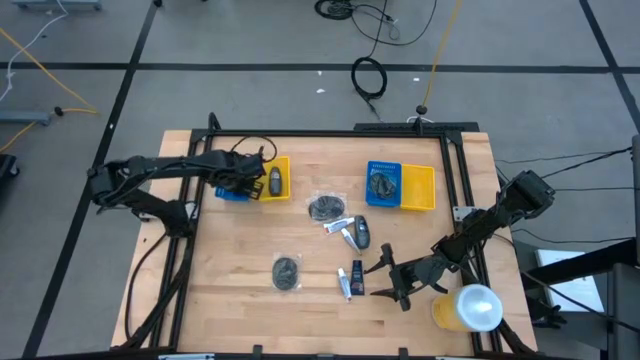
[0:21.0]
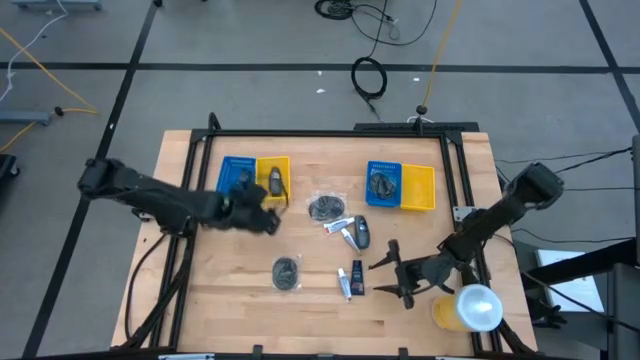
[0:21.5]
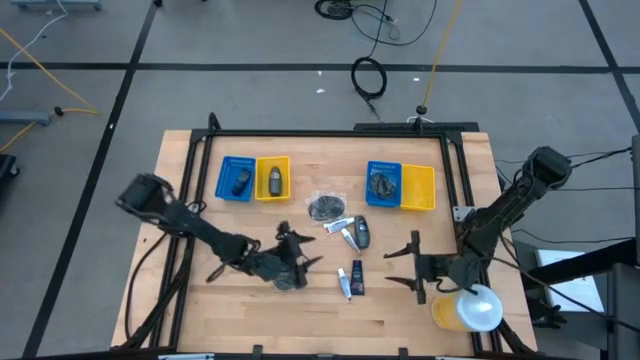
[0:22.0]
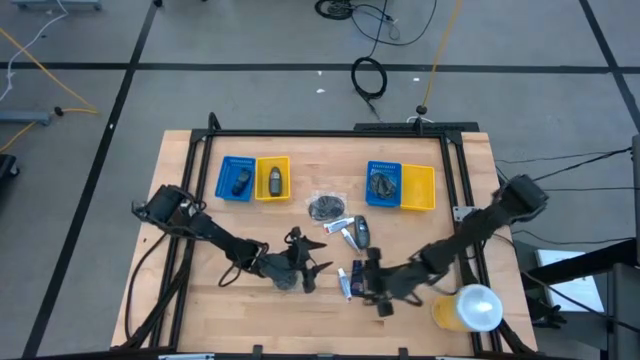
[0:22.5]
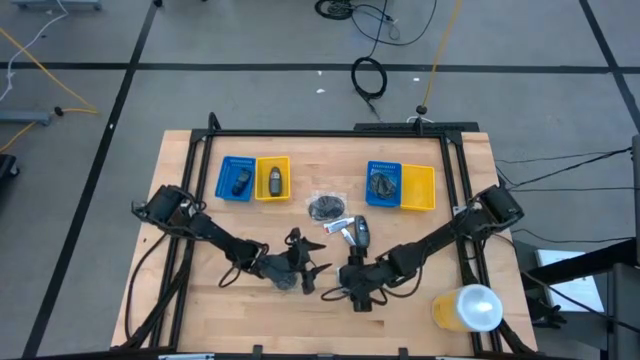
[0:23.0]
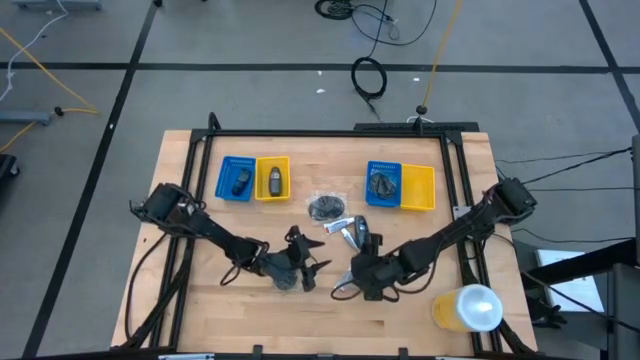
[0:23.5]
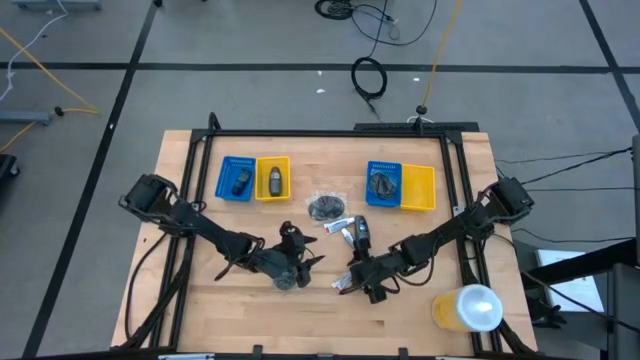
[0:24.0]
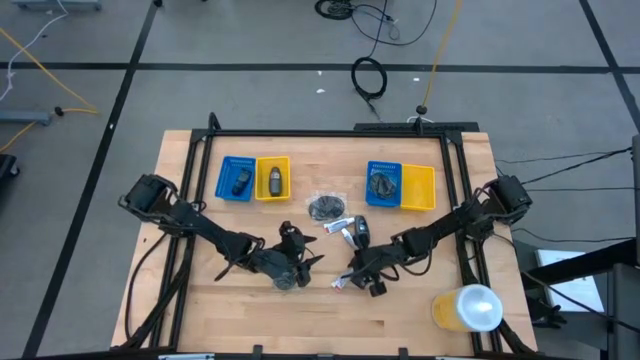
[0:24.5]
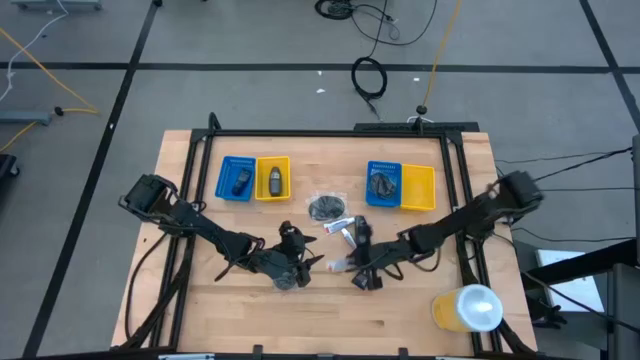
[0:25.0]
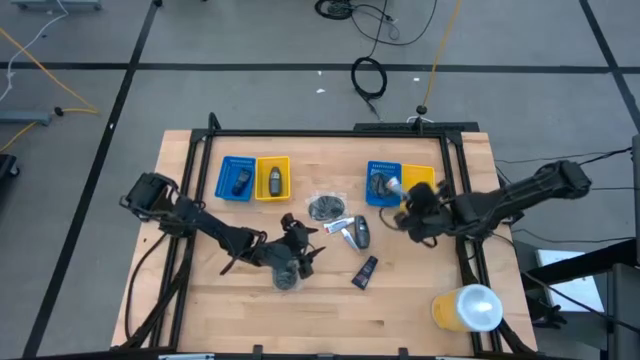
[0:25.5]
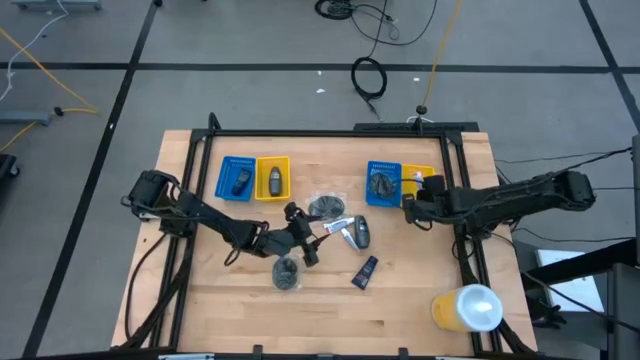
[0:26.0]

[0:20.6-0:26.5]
Task: Pick & Place Travel size toiletries
Put the white toothpaste into the right yellow bin

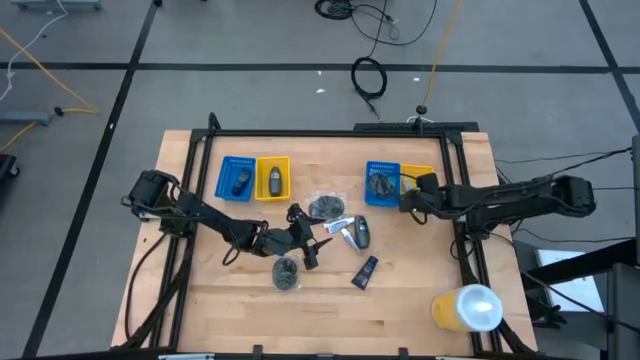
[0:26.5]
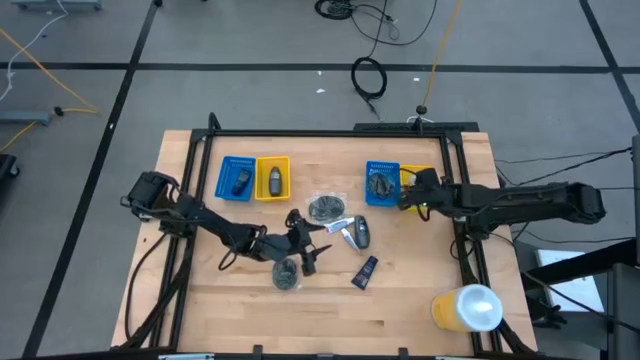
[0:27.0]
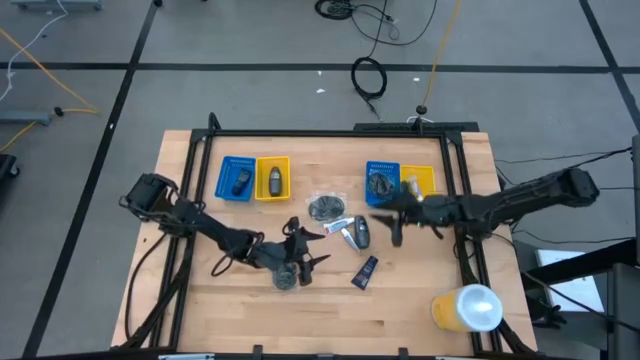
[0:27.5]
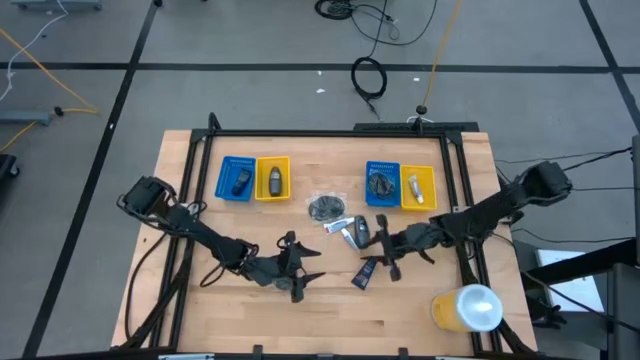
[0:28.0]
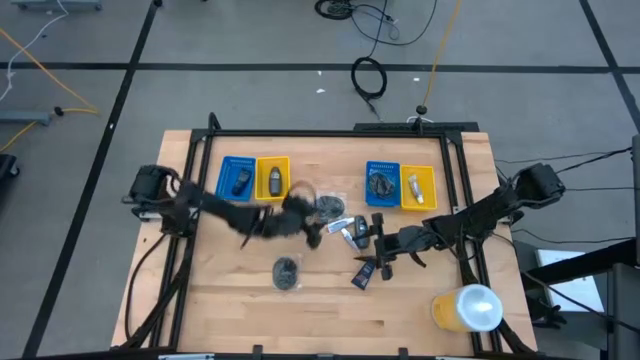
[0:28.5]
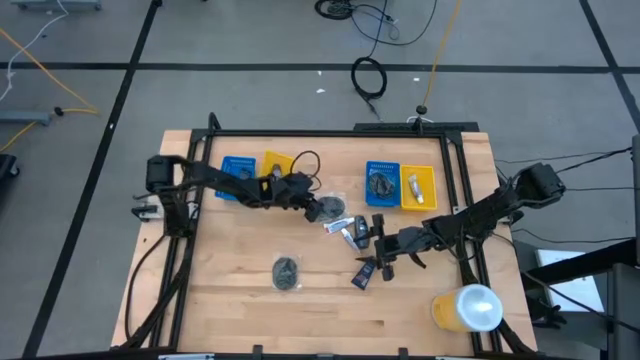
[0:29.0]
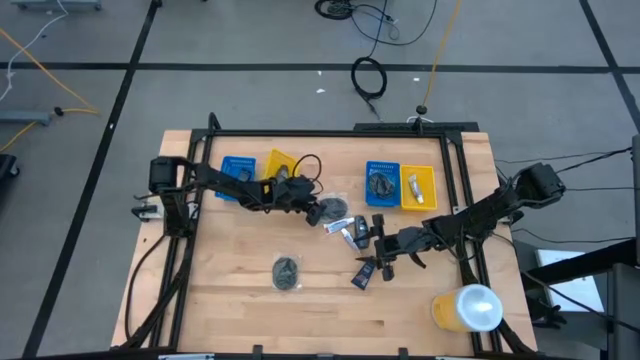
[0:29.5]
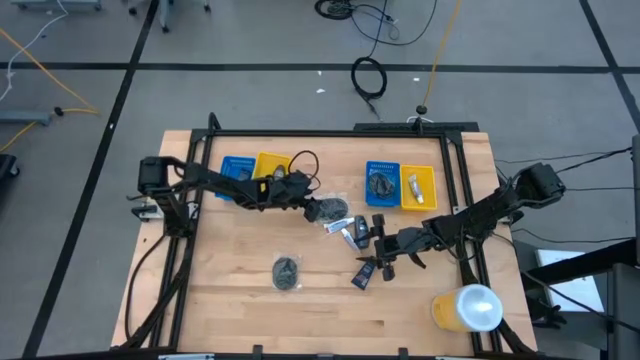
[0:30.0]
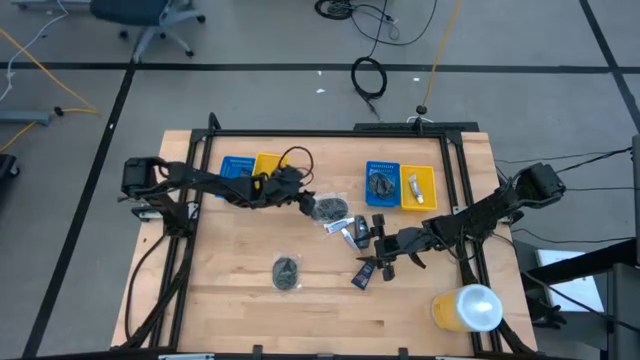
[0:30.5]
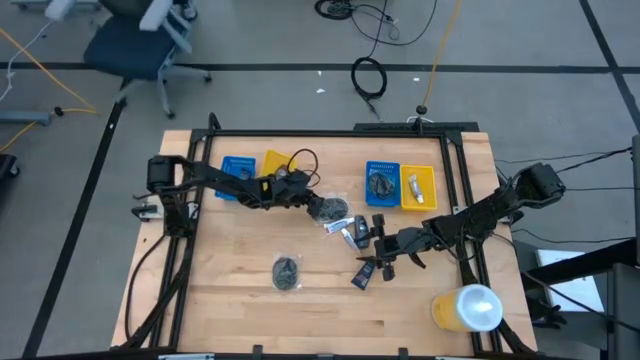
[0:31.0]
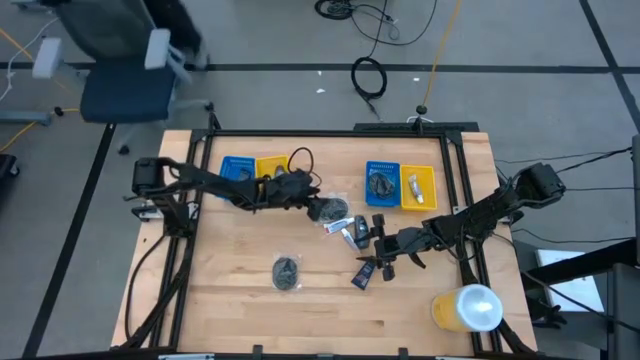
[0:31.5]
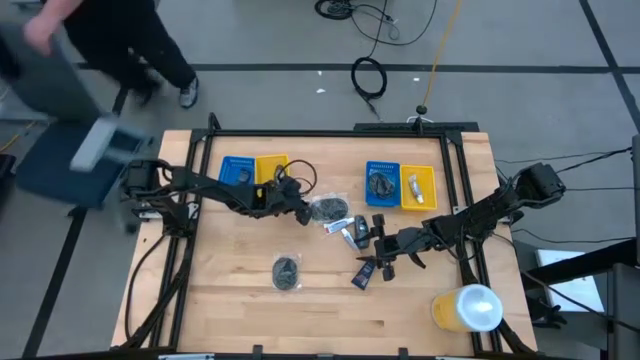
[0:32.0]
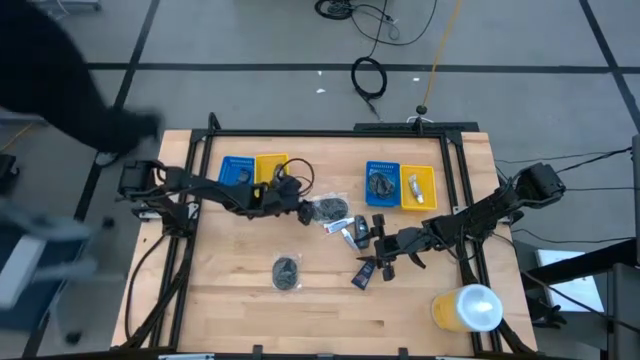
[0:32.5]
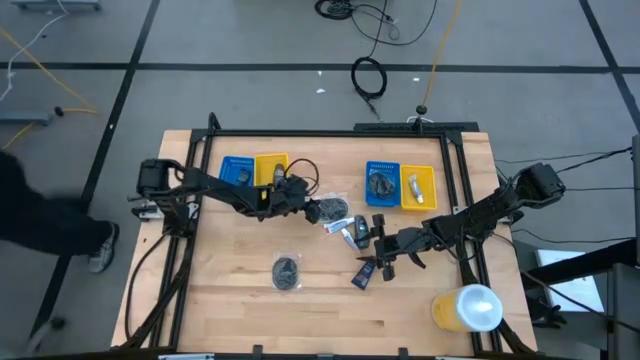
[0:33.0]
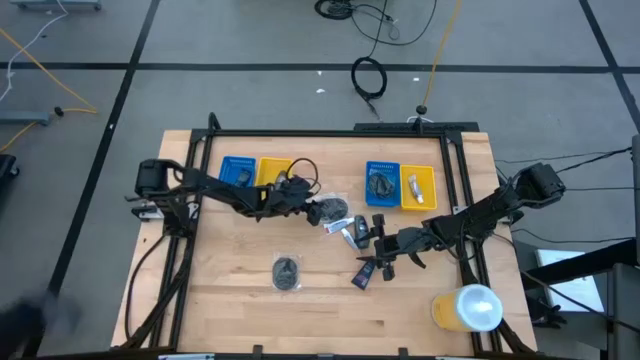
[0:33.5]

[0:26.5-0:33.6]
Adjust the yellow bin

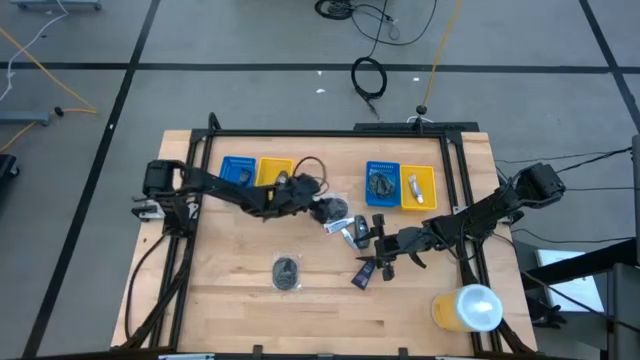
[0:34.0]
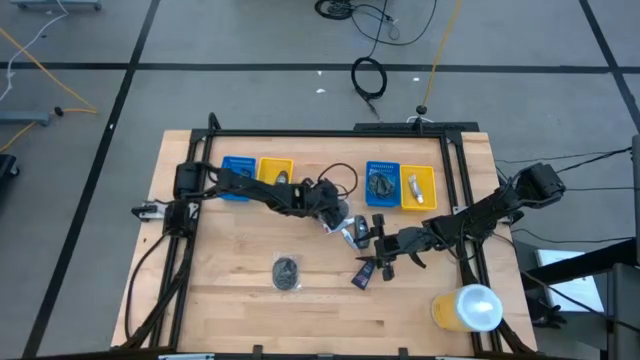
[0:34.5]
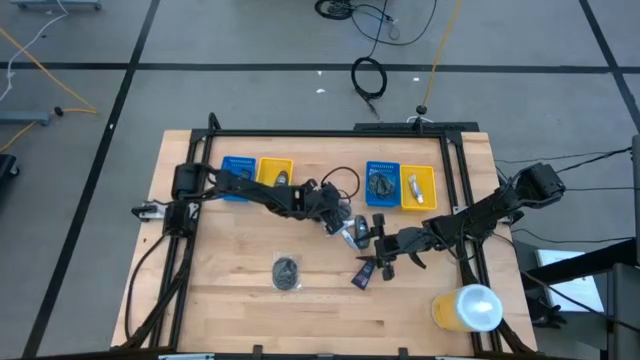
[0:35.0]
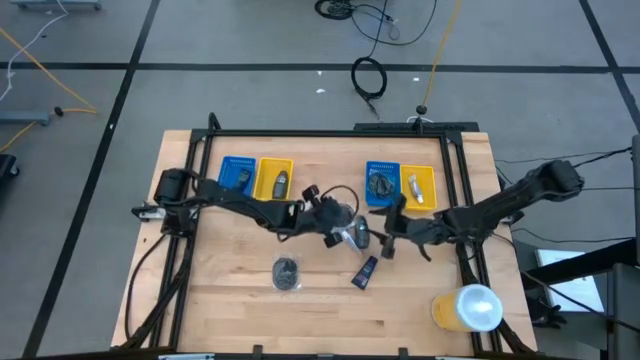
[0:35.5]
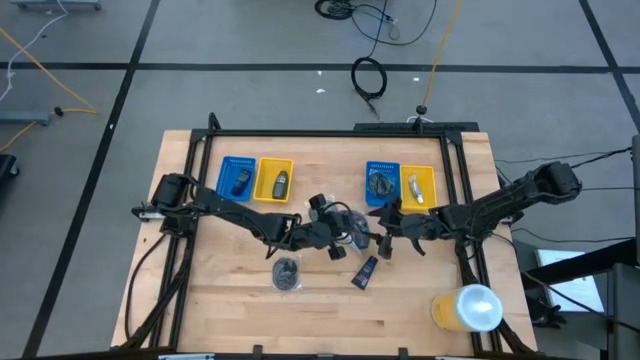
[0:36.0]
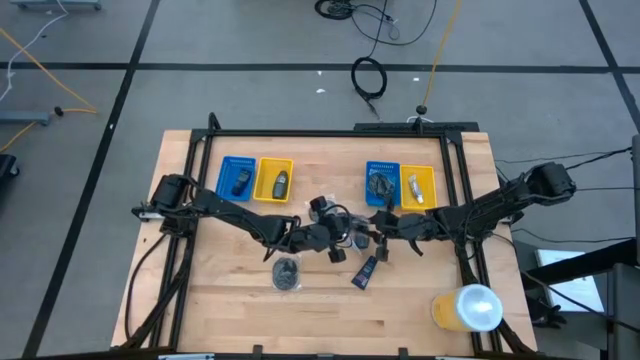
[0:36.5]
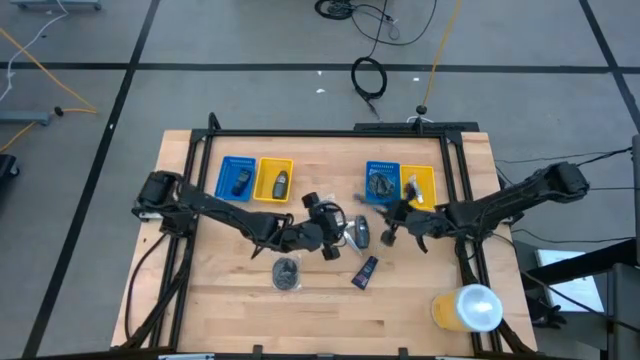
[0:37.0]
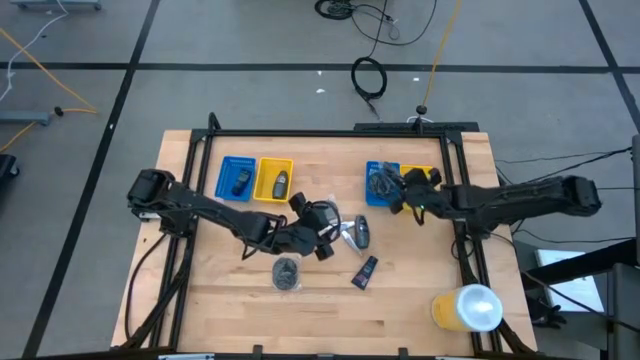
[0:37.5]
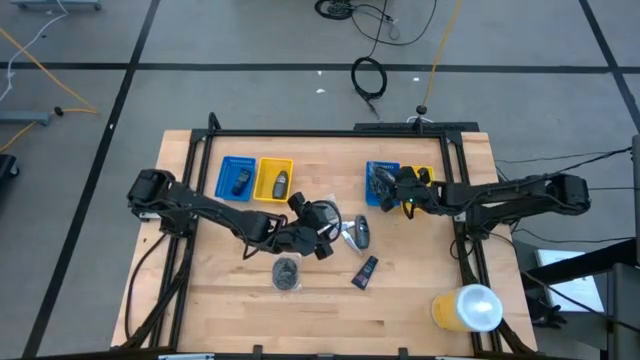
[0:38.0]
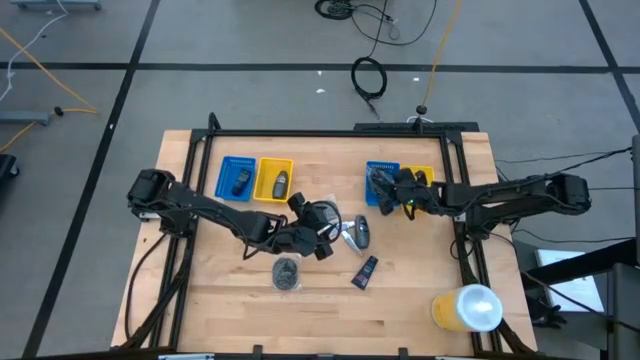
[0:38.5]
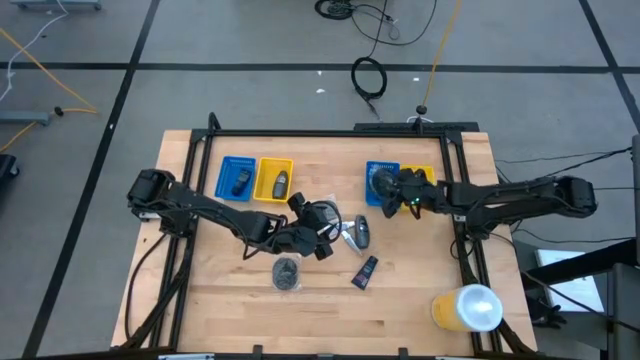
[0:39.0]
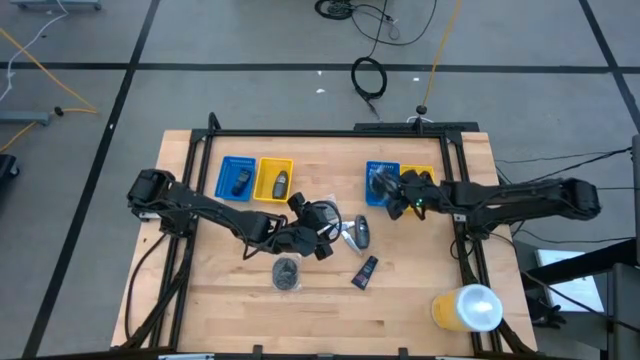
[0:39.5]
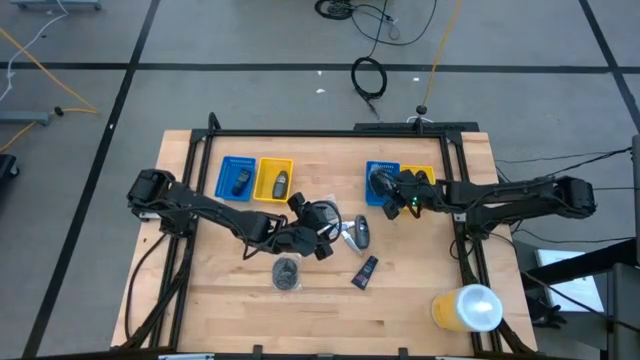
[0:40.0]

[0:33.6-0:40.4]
Put the black hairbrush into the right blue bin

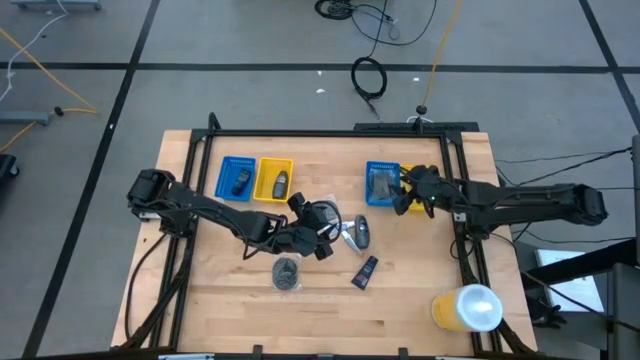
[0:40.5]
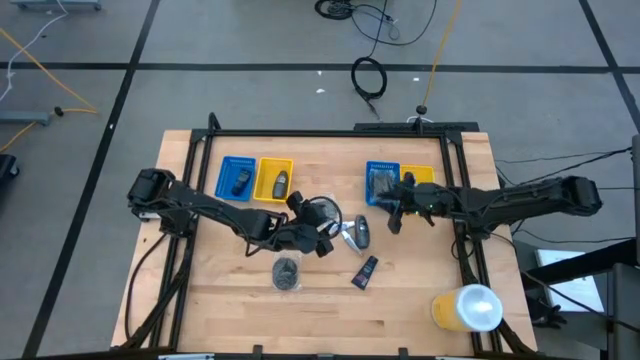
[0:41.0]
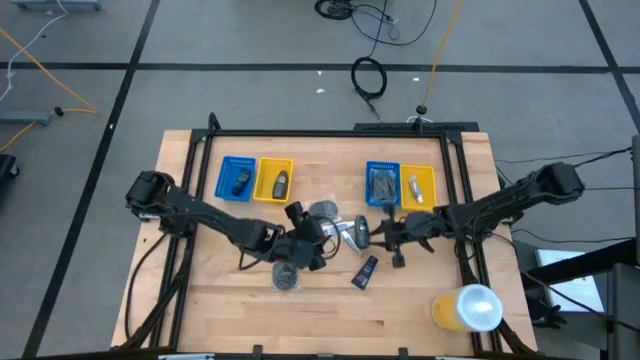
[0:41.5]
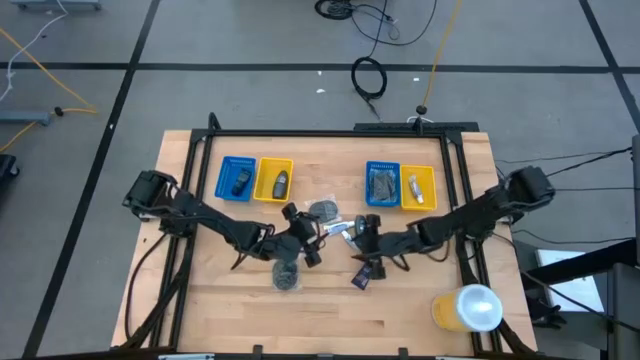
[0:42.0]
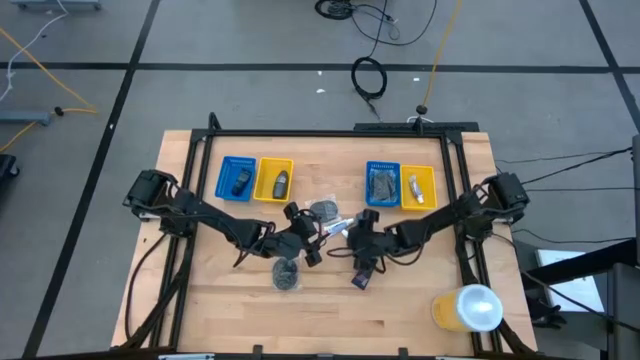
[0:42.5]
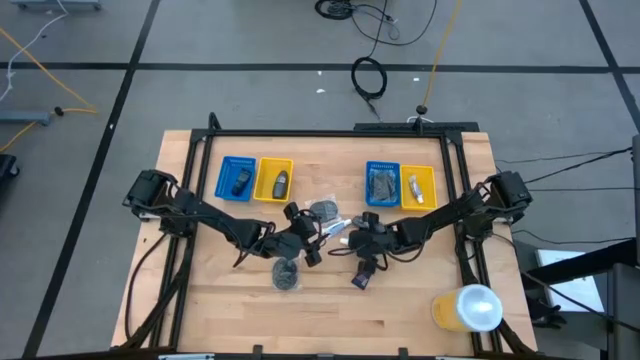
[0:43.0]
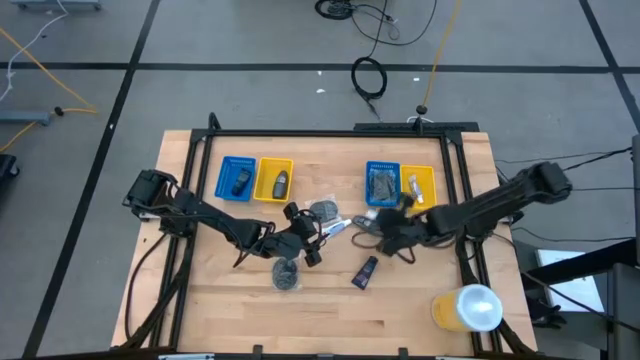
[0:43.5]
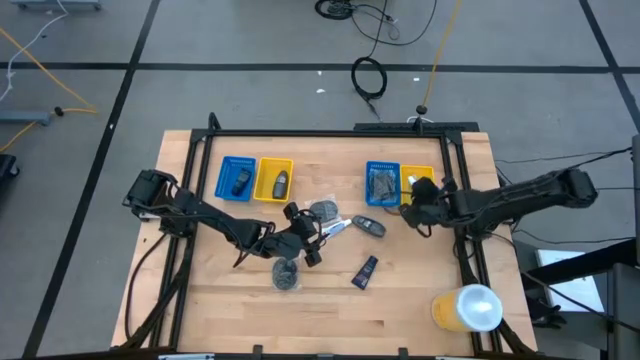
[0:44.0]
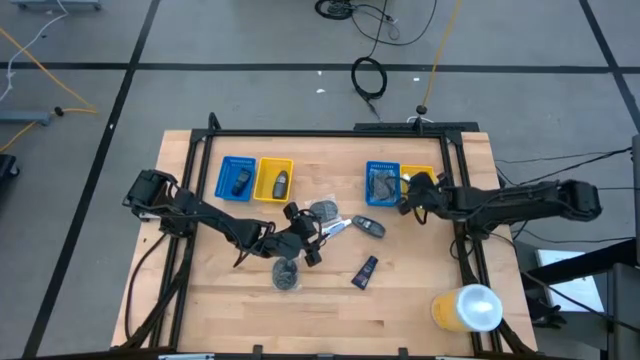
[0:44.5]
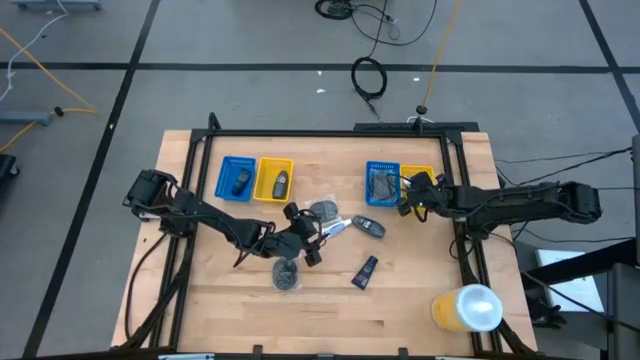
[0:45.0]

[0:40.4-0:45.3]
Put the white toothpaste into the right yellow bin
